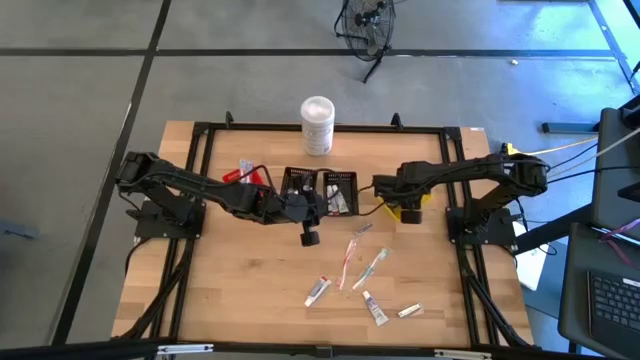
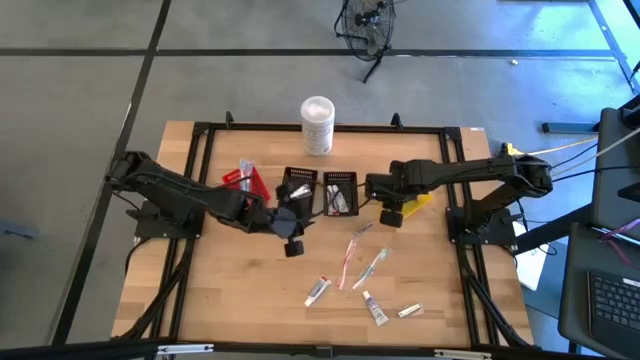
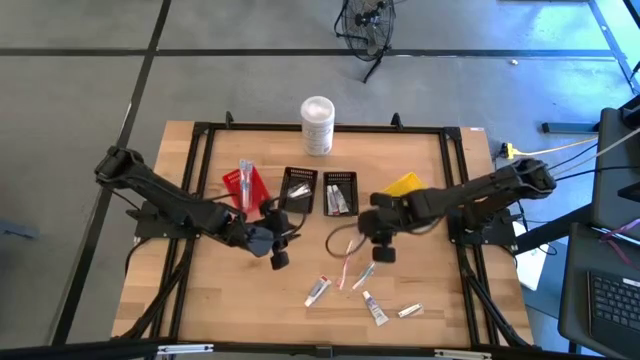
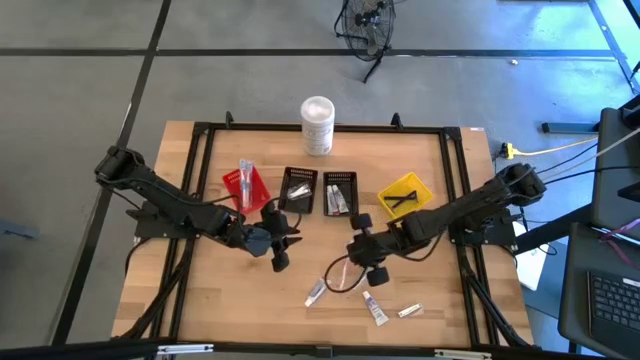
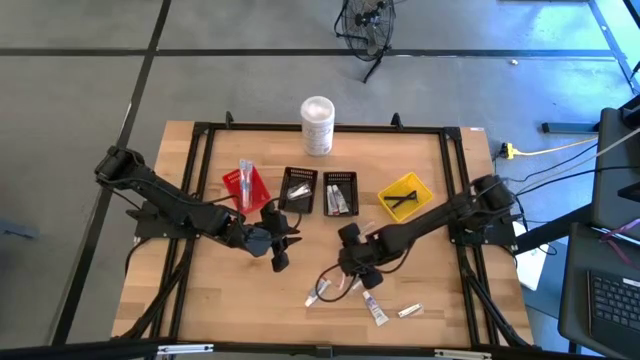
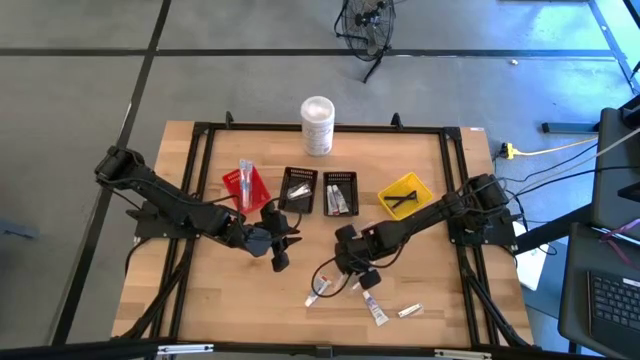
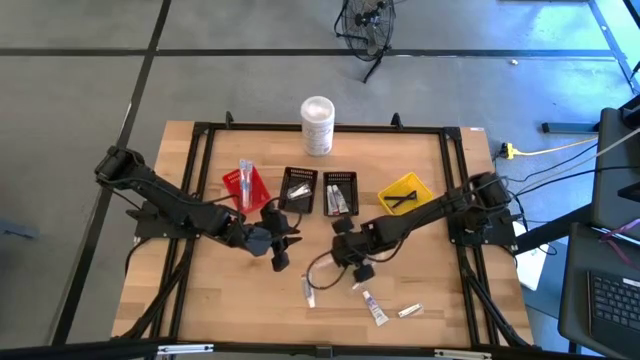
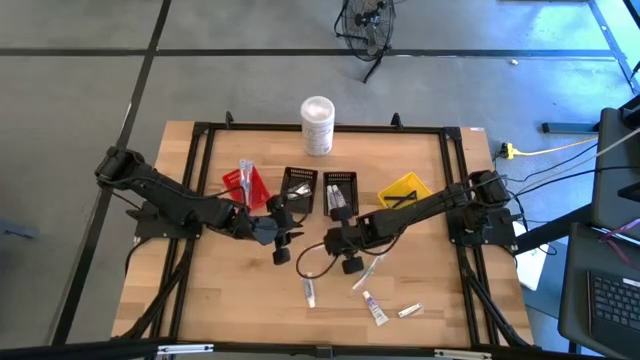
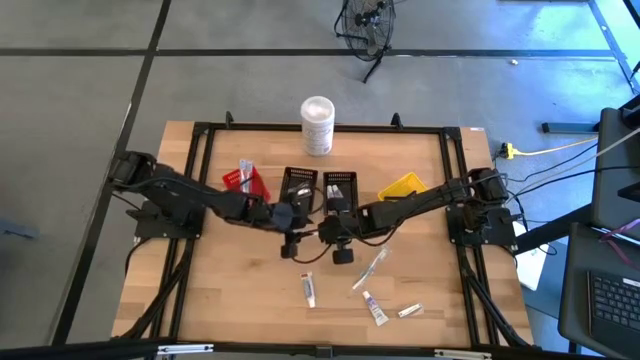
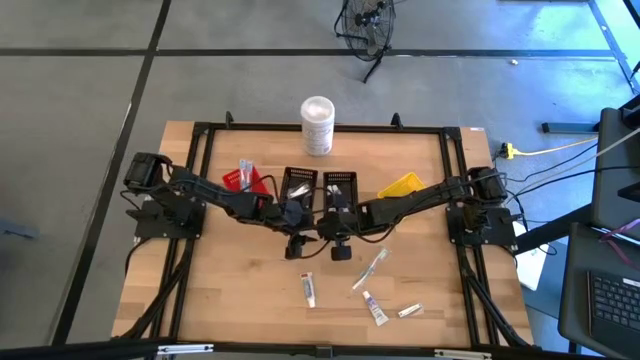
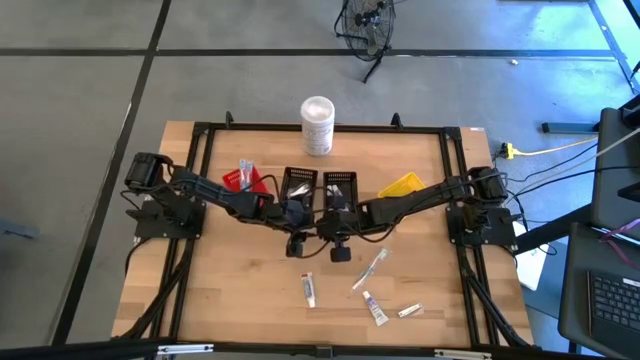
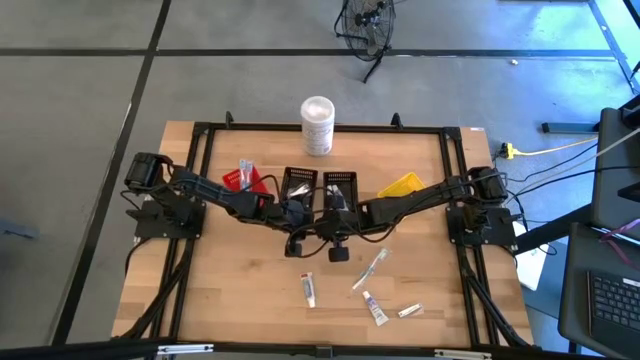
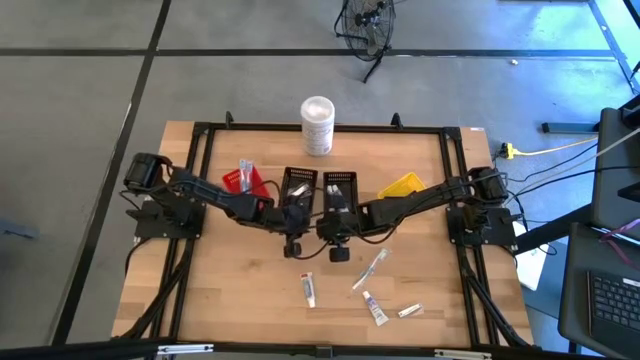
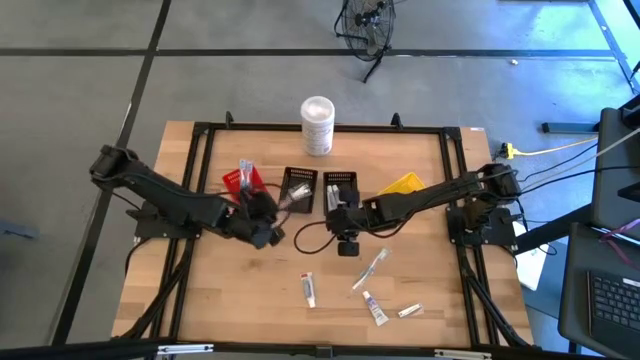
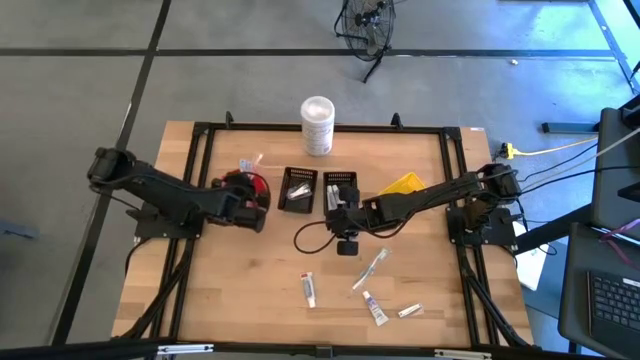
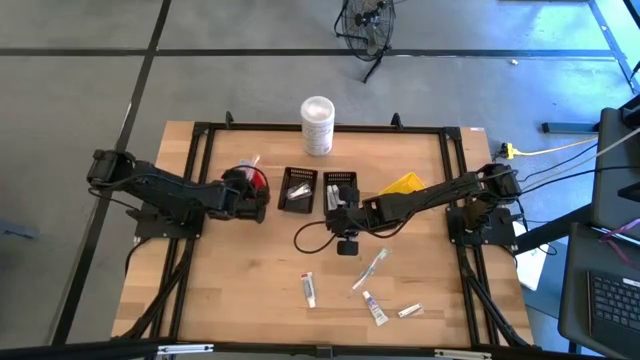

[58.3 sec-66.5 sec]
Task: Pick & Place Travel size toiletries
Put the red toothbrush into the red bin

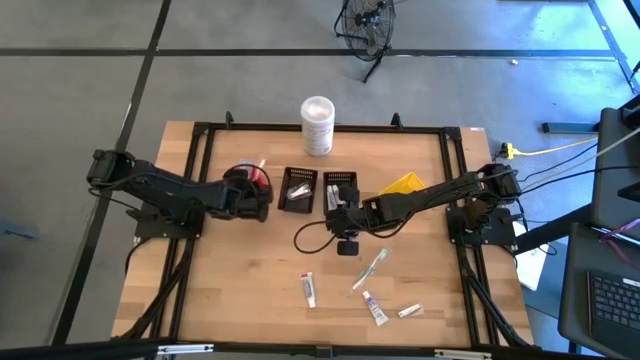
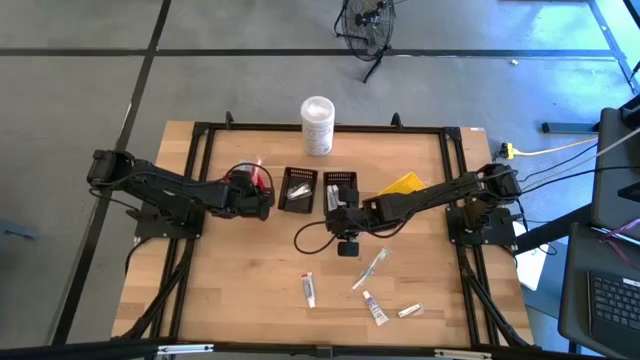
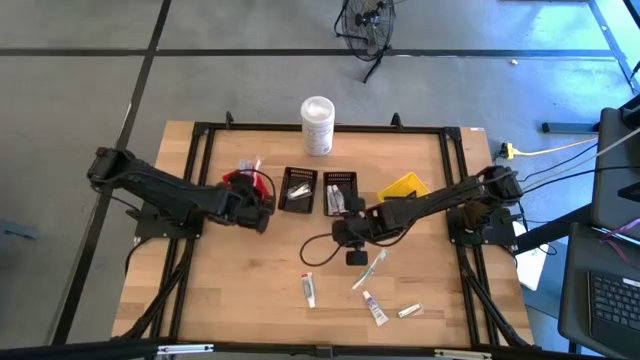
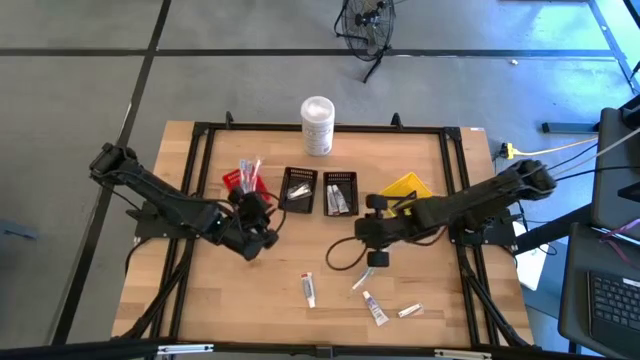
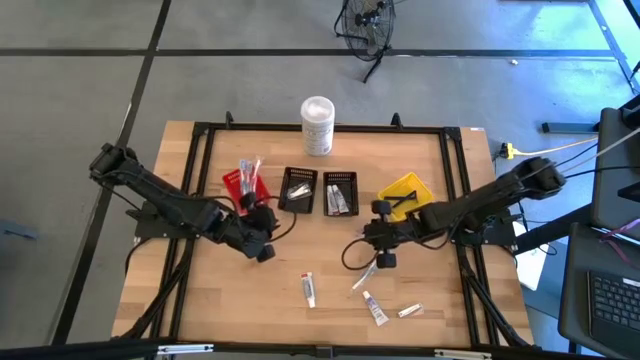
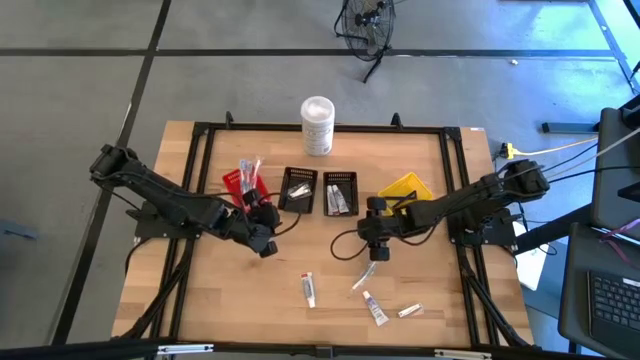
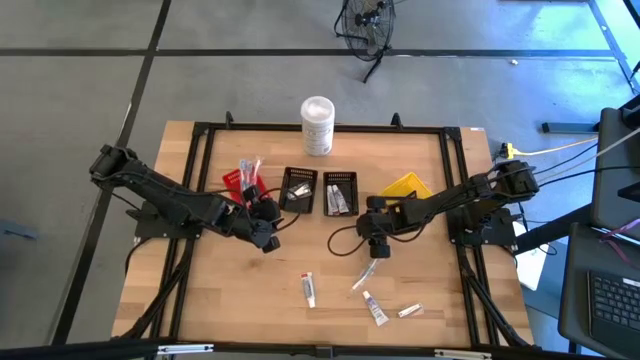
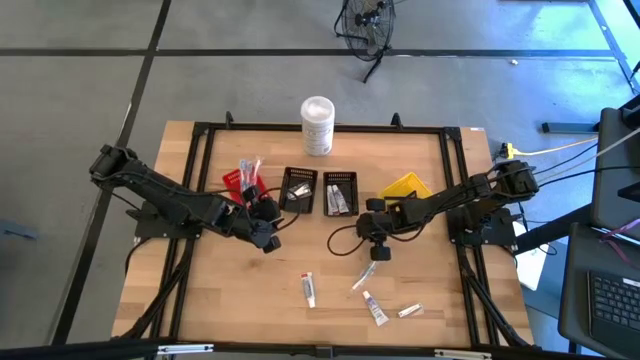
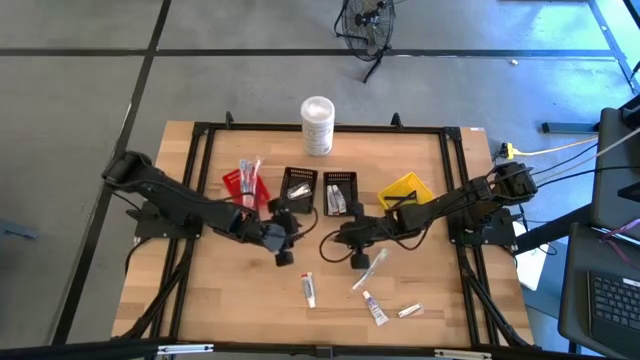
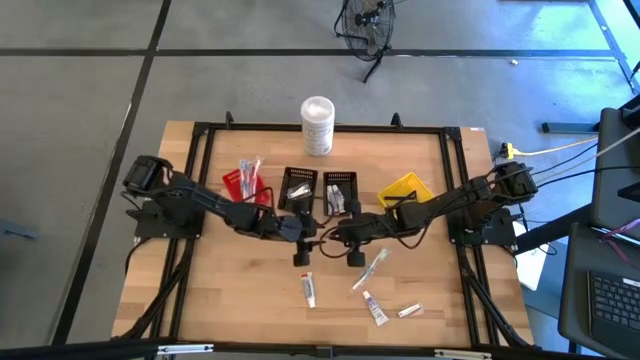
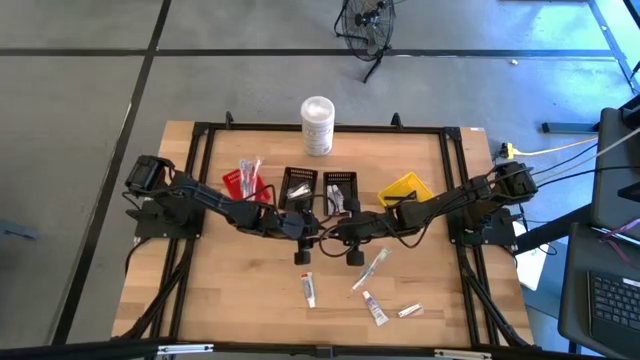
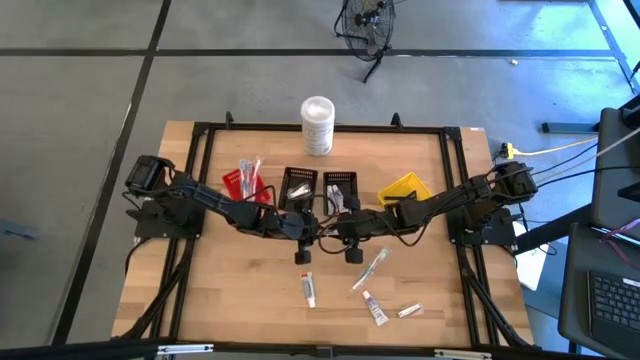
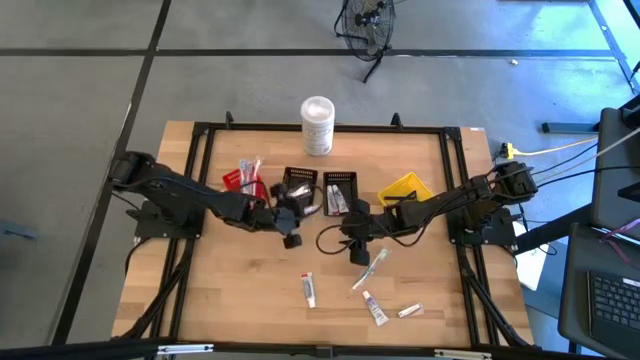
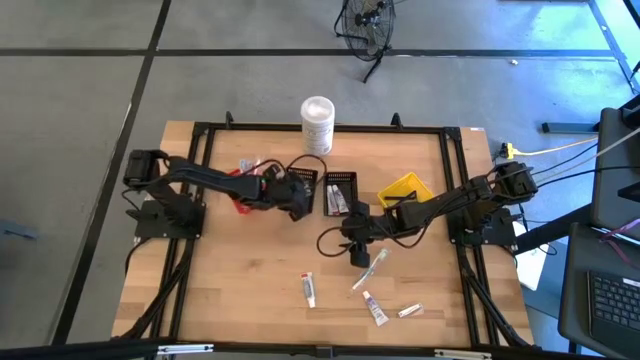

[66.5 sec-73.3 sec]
Put the silver nail cutter into the left black bin

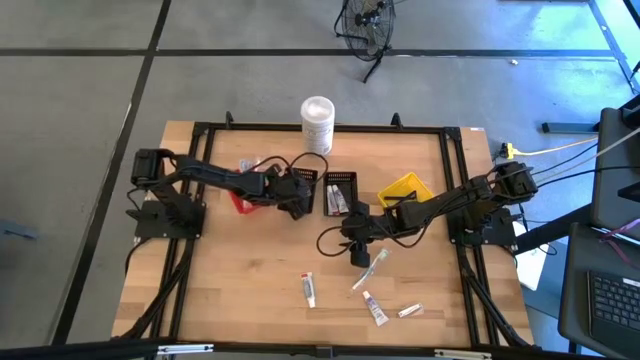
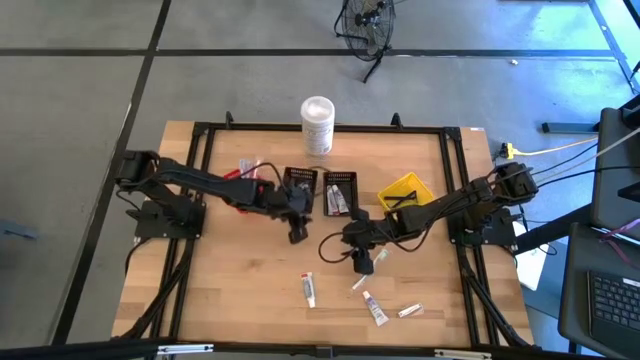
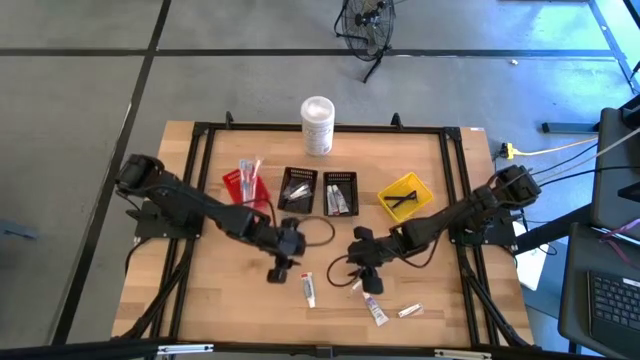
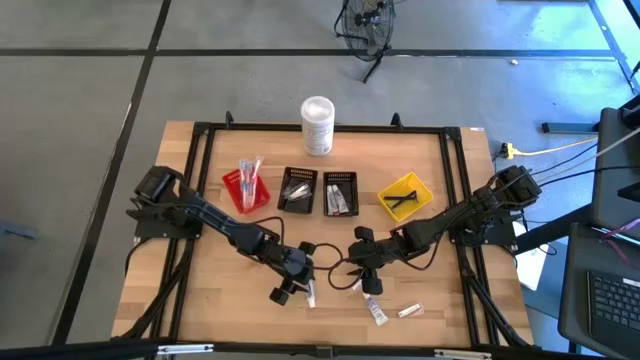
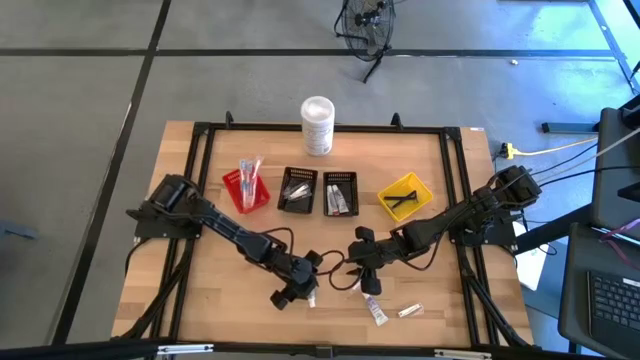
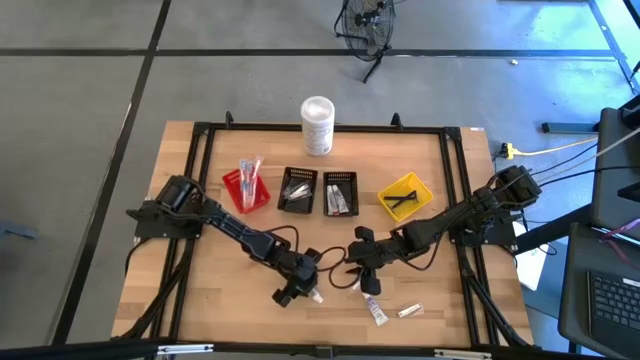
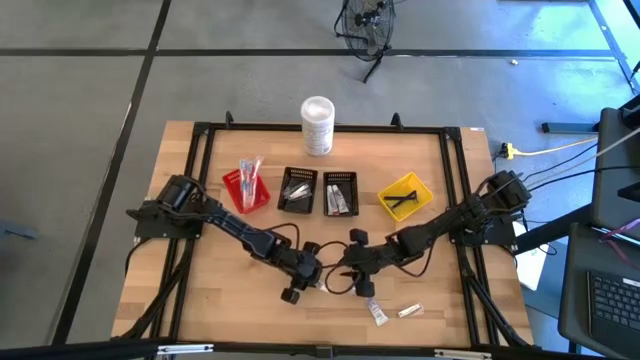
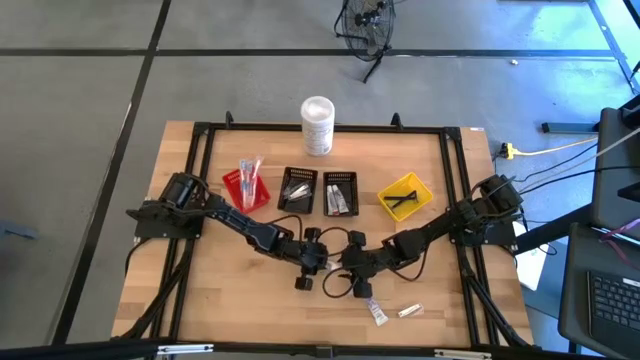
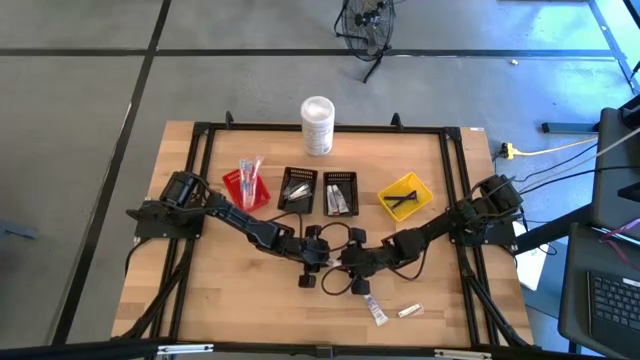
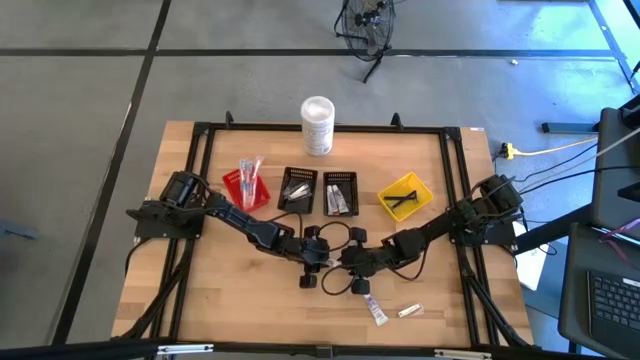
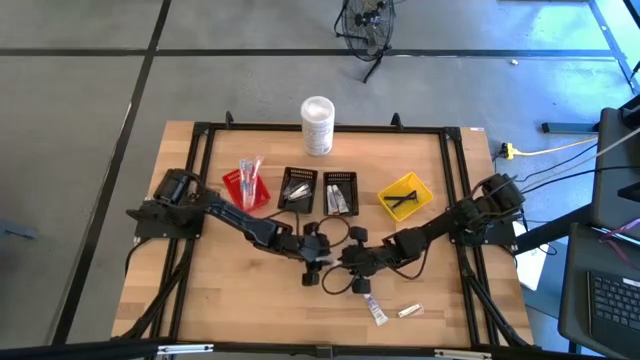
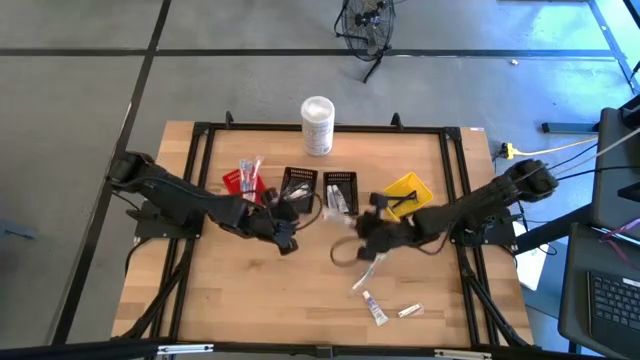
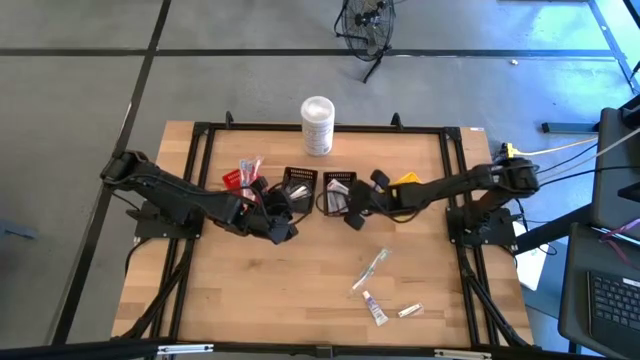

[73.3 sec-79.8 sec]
Put the white toothpaste into the right black bin
